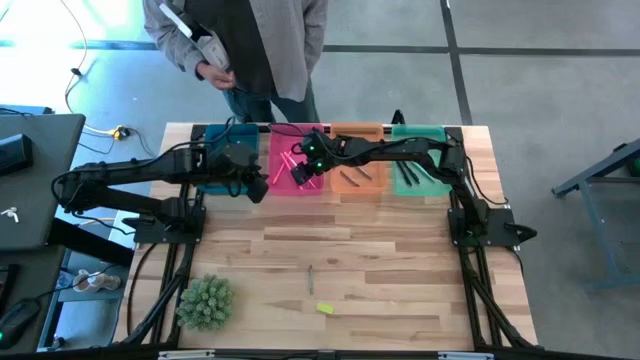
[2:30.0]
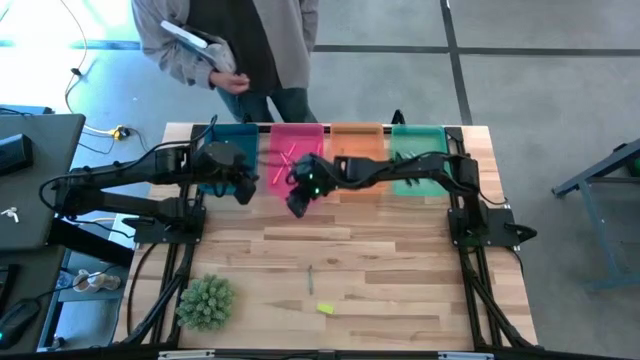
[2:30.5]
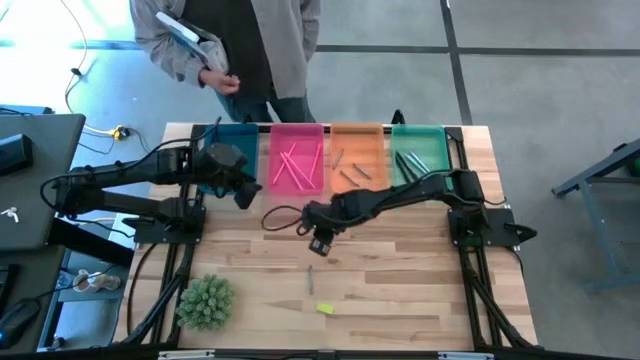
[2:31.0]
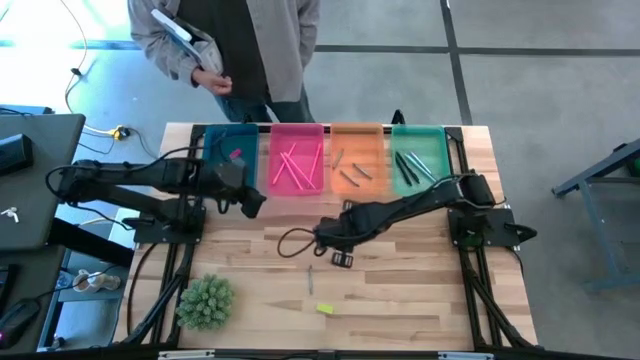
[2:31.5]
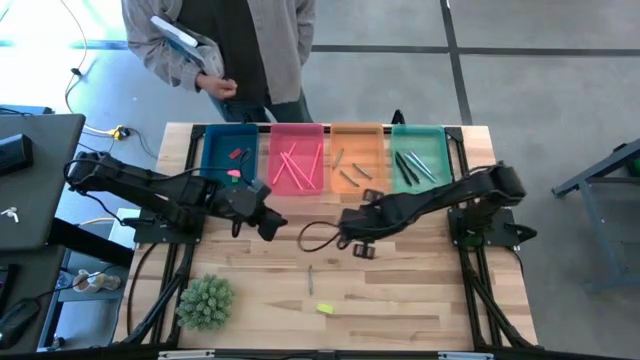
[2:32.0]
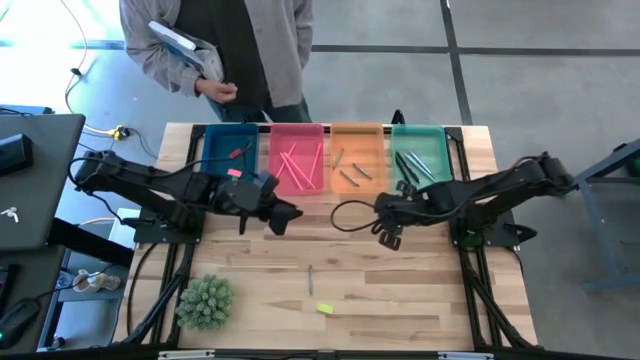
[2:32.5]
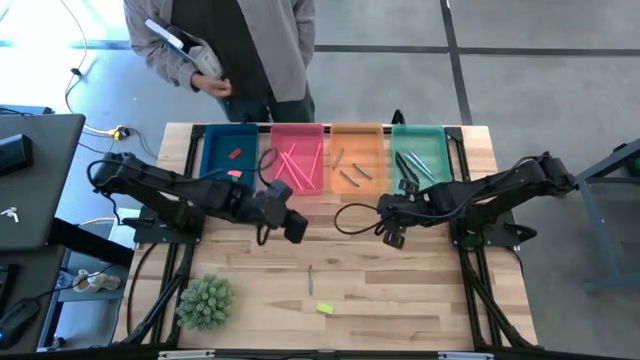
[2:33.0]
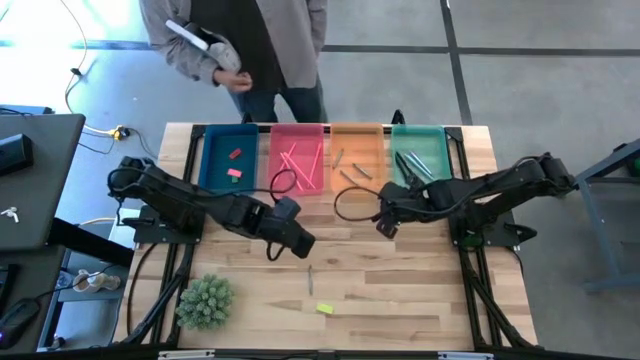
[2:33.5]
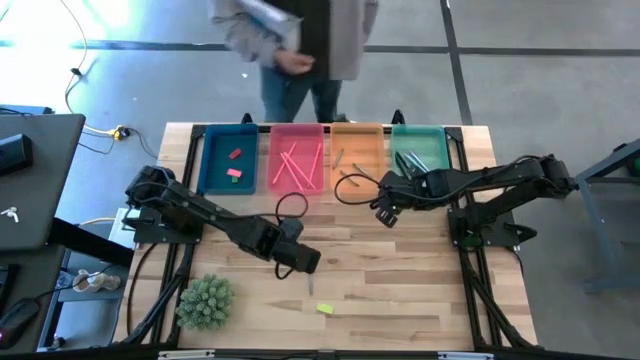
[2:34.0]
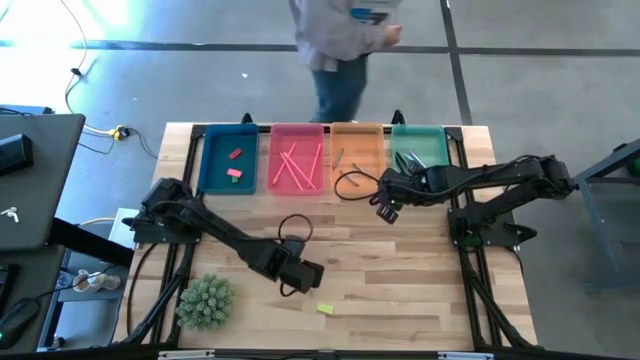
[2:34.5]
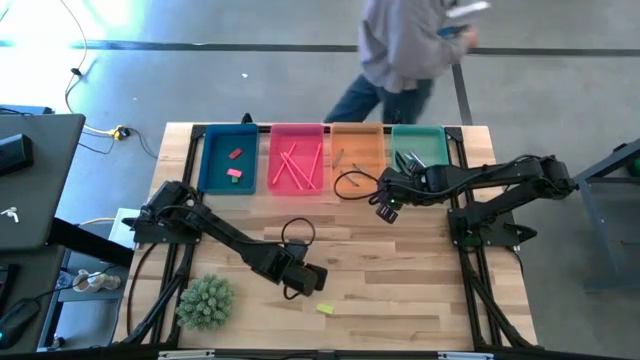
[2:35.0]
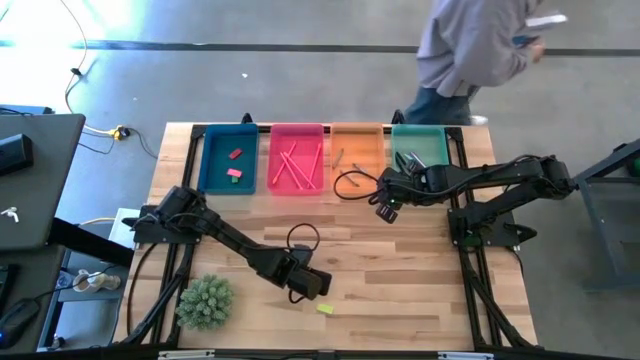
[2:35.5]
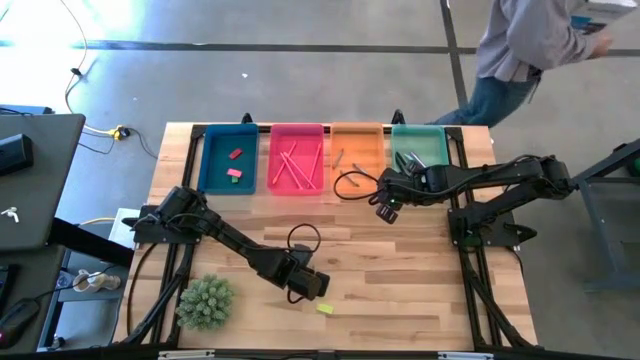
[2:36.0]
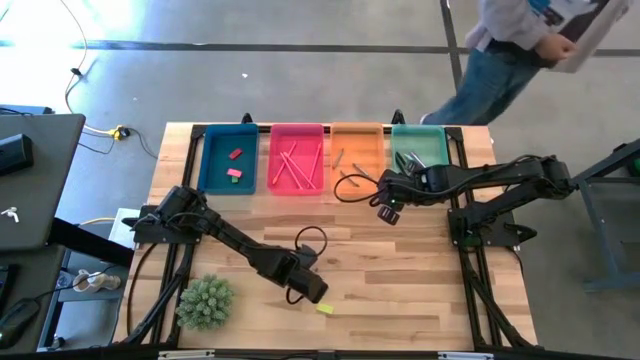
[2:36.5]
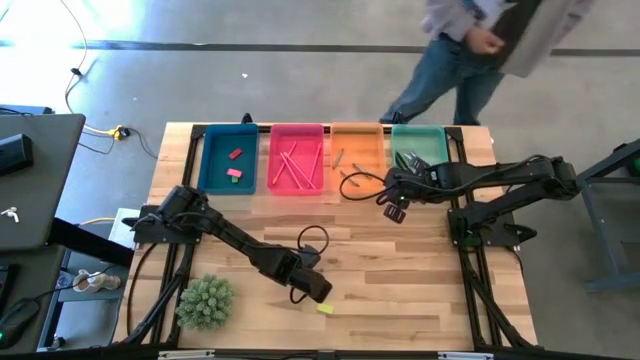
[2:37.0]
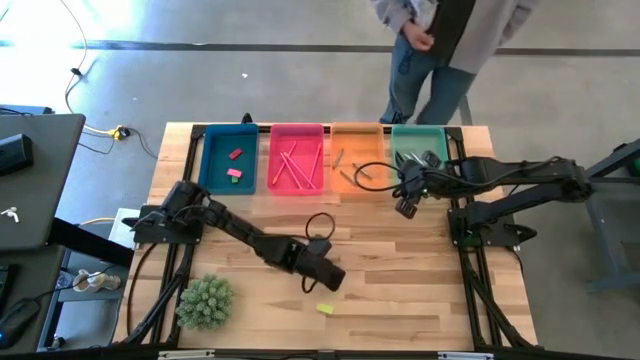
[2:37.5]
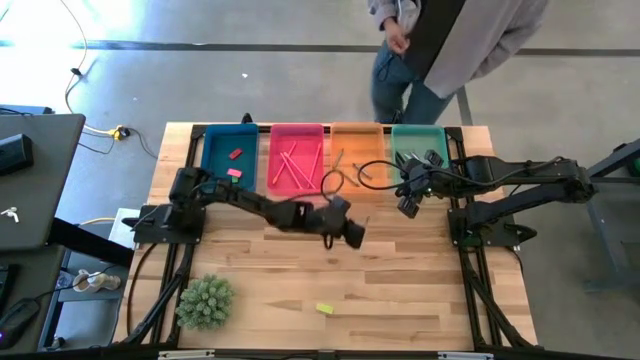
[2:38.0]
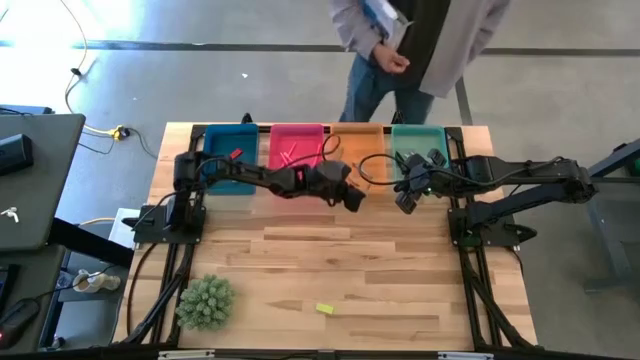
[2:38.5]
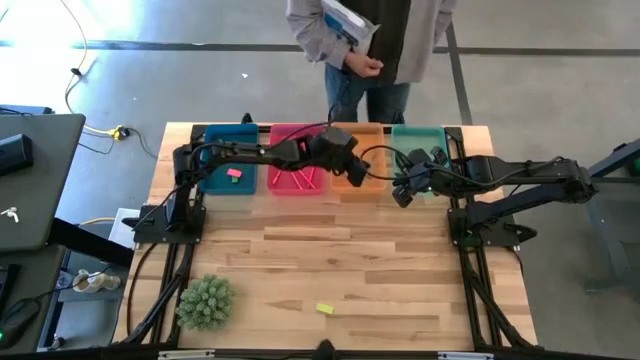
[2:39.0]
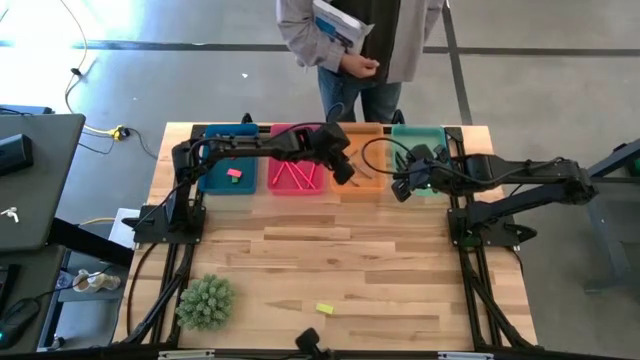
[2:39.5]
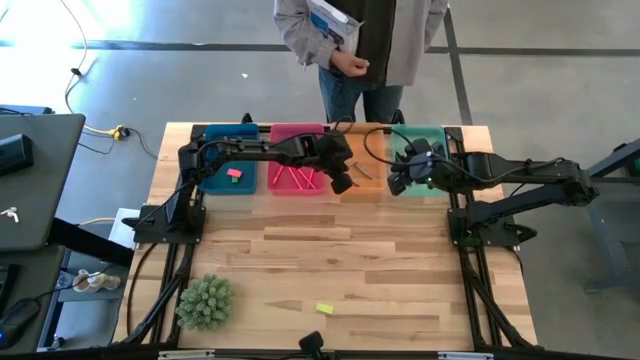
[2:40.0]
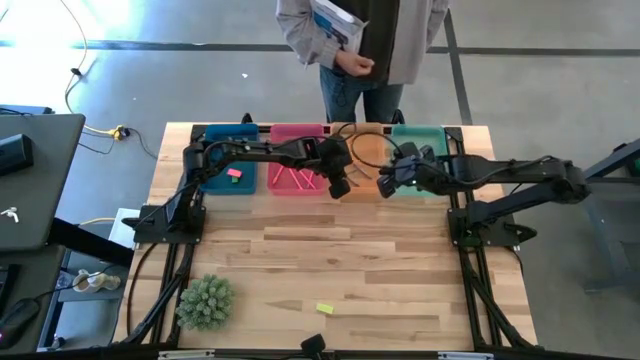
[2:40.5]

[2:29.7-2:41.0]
Task: Sort crayons/erasers/pens/pencils in bins
Put the gray crayon into the orange bin

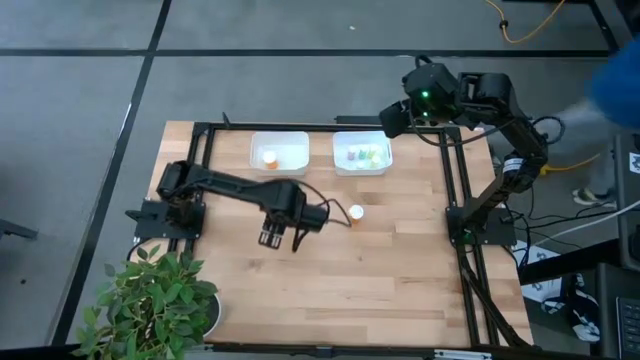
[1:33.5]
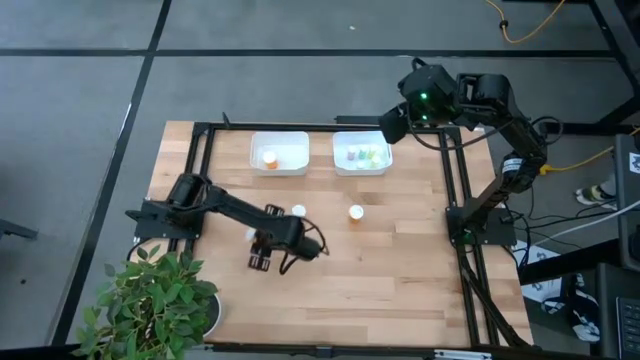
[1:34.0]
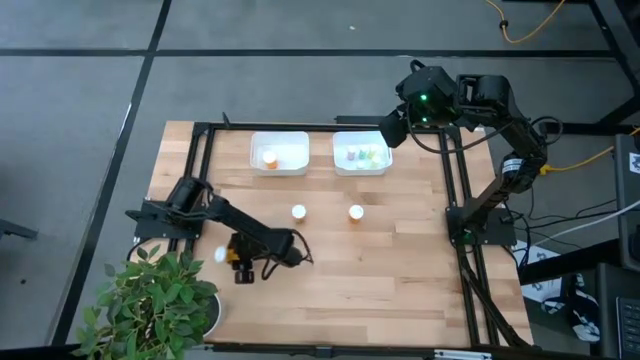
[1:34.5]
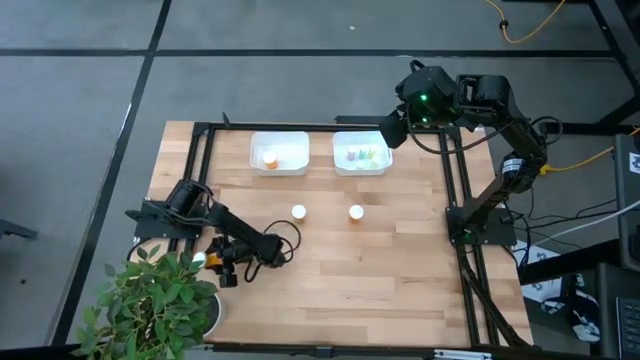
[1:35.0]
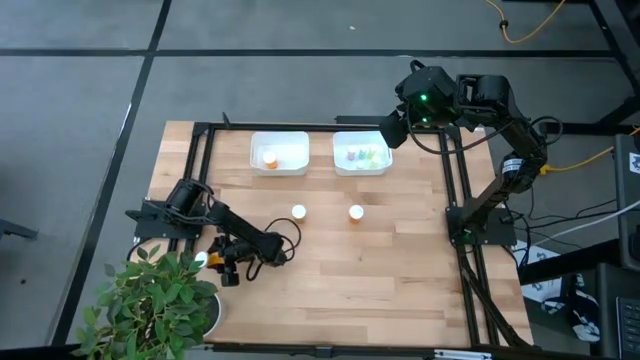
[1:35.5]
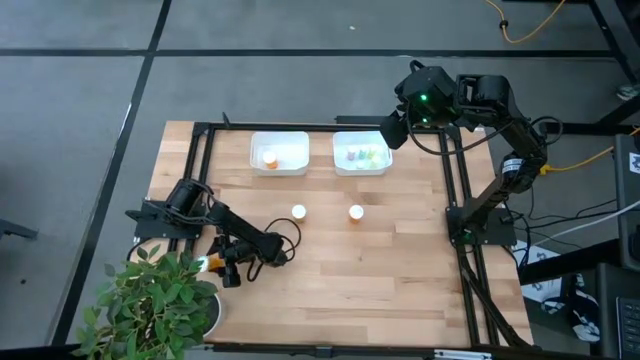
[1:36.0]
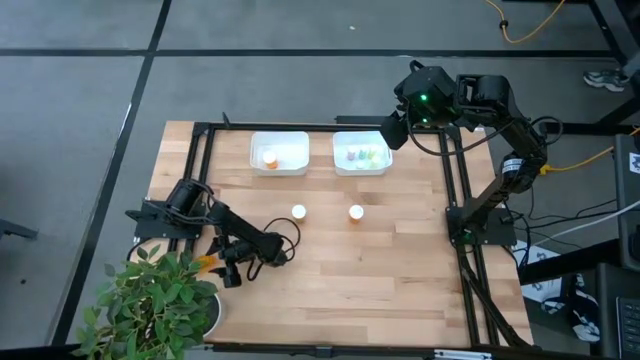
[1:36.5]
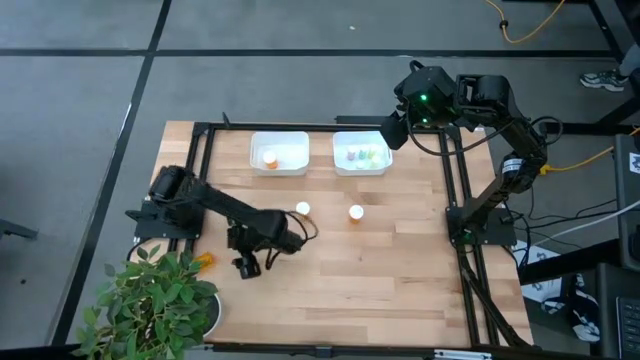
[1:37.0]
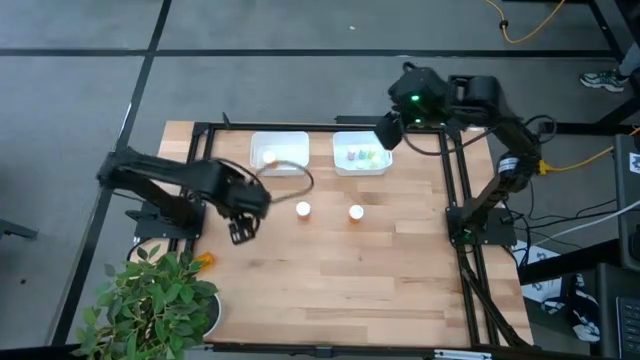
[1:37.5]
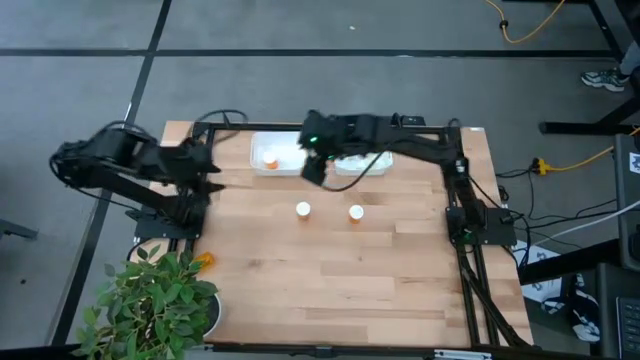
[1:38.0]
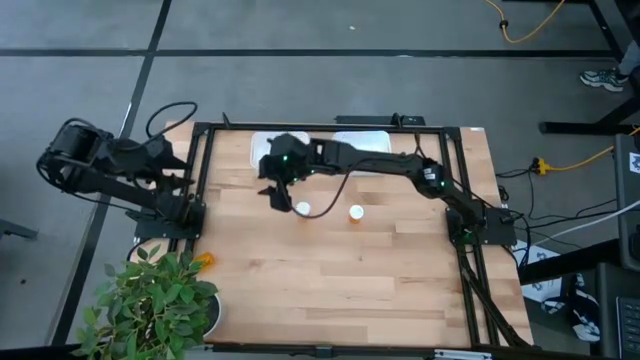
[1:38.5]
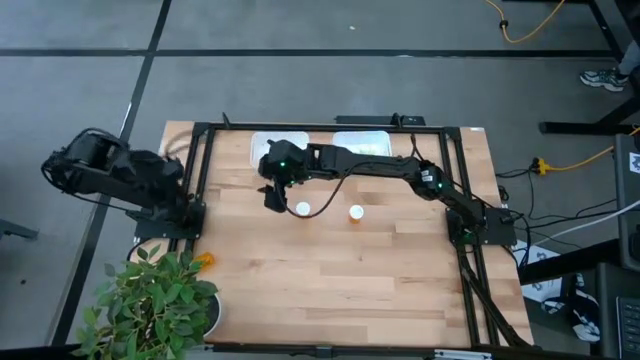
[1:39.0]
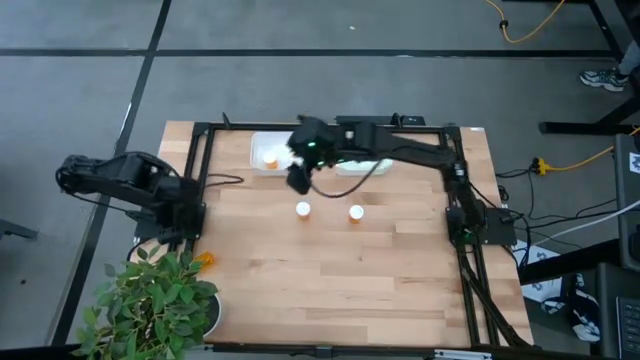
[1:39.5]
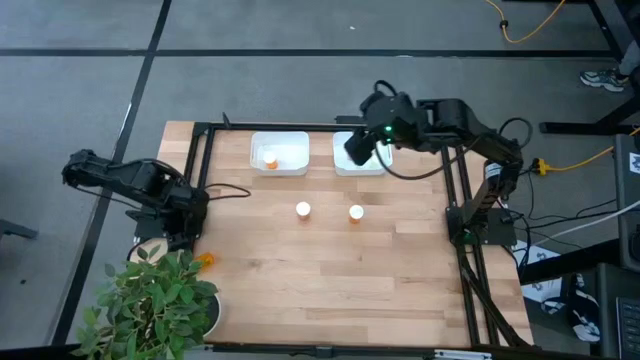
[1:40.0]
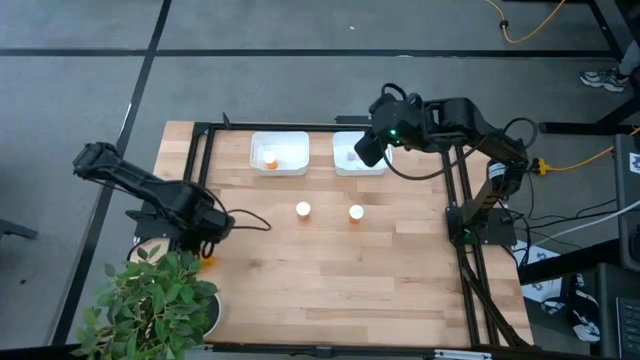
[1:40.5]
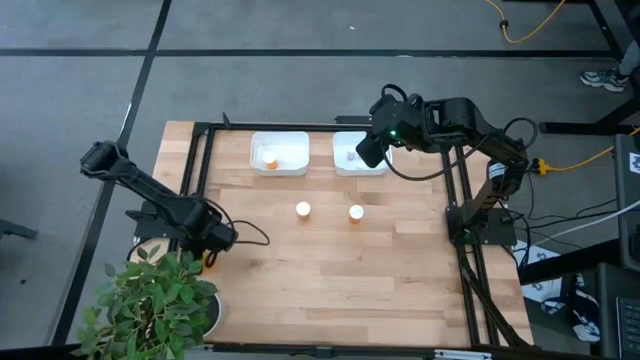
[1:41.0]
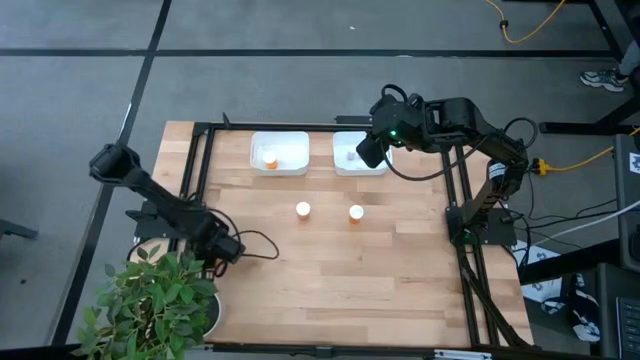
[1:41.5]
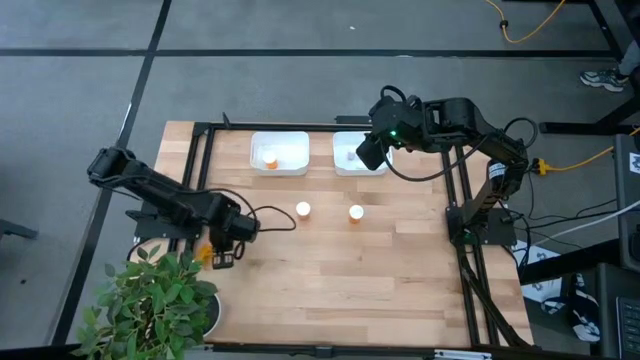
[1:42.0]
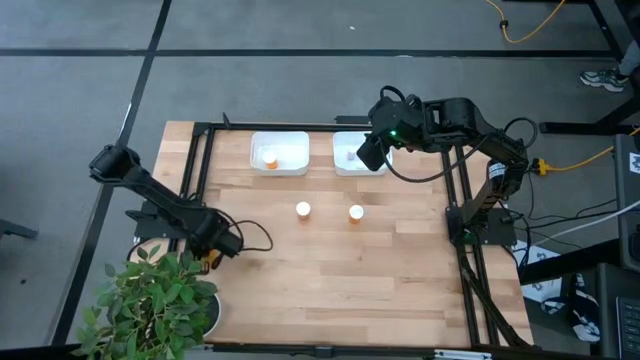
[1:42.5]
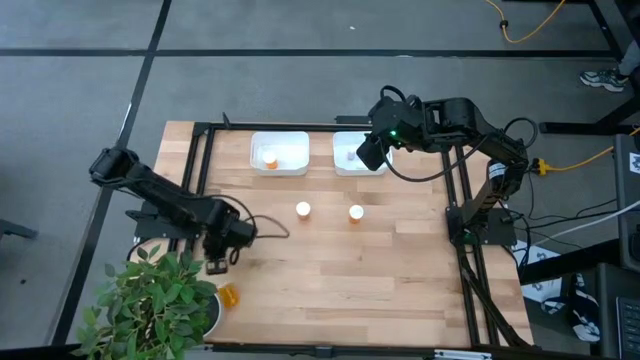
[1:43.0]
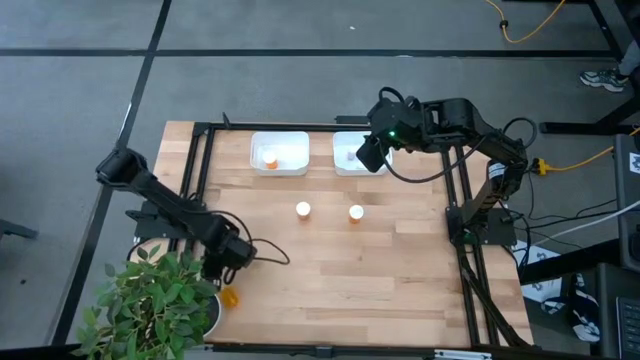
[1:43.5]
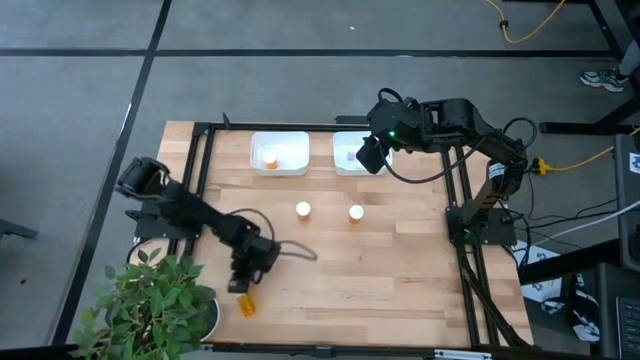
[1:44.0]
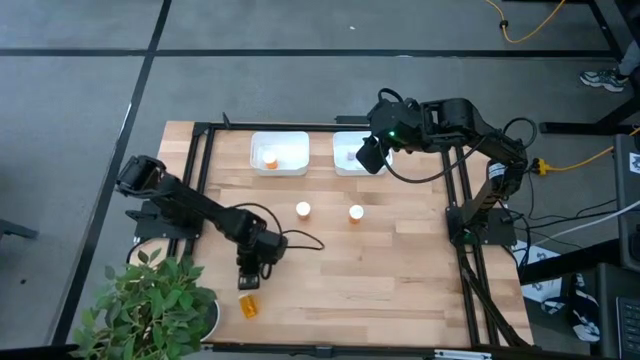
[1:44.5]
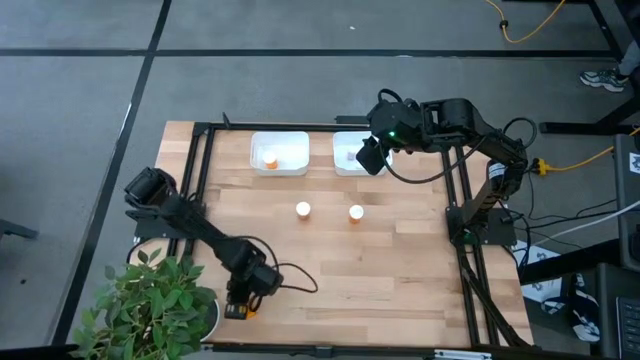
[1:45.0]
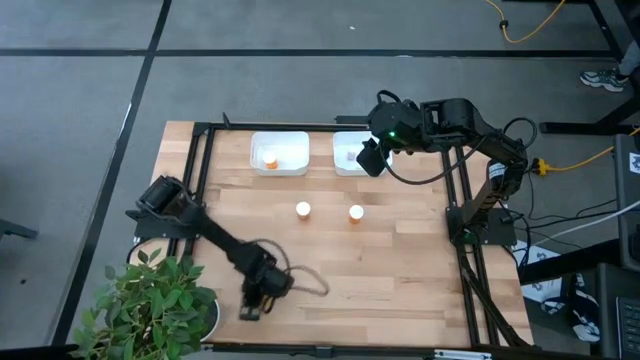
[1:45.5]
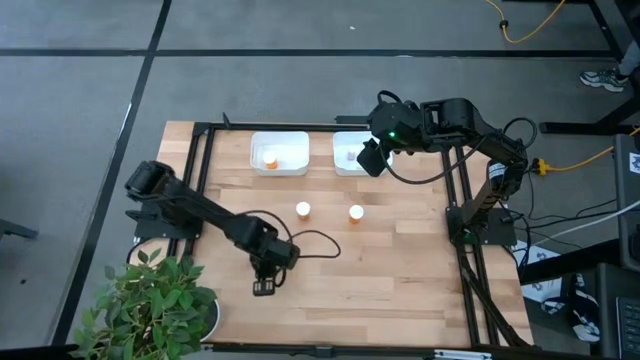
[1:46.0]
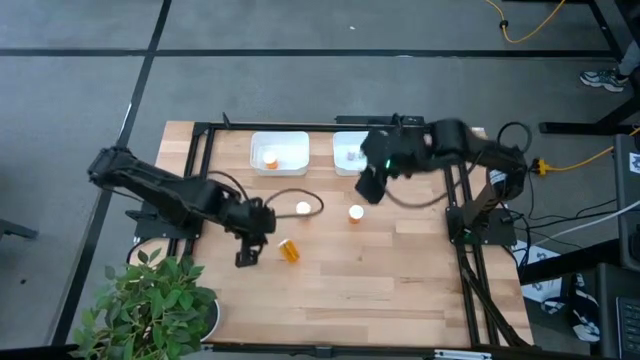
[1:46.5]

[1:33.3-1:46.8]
Task: Pick and place medicine bottles into bin by pill shape (circle, oval)
Put the orange pill bottle into the left white bin
